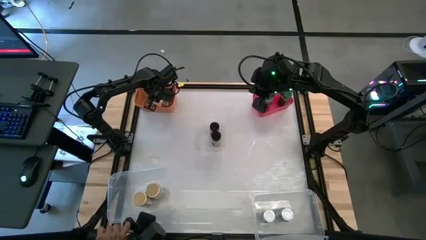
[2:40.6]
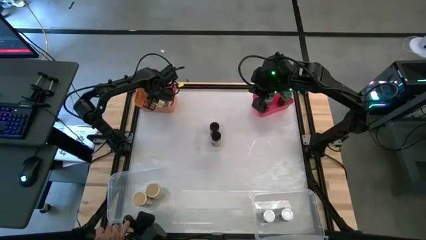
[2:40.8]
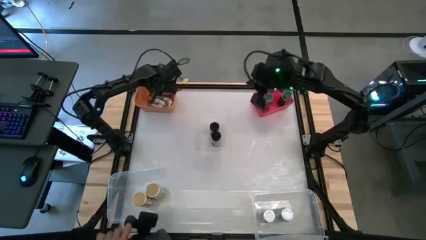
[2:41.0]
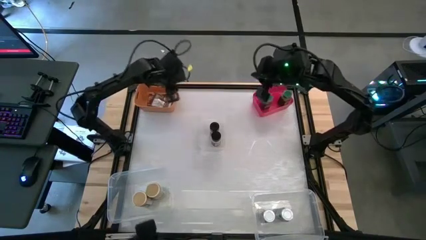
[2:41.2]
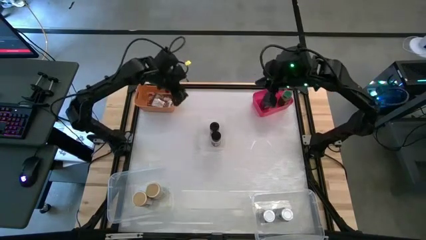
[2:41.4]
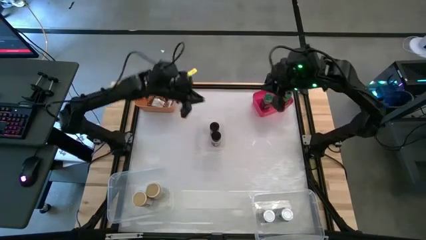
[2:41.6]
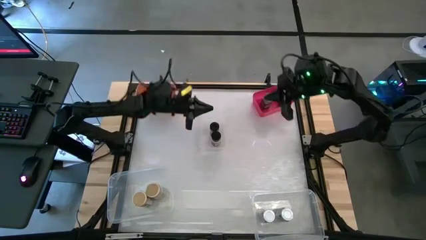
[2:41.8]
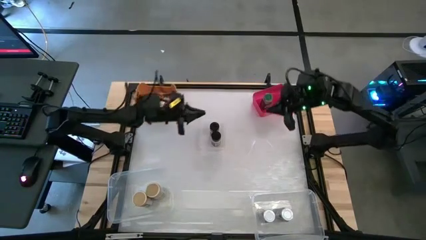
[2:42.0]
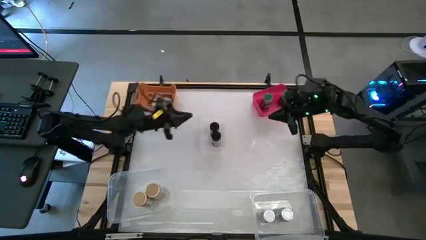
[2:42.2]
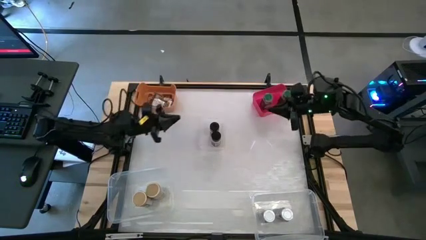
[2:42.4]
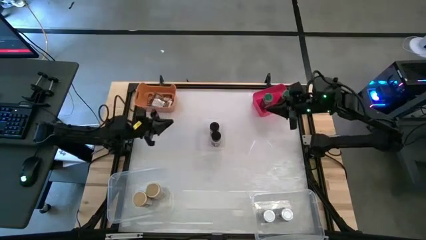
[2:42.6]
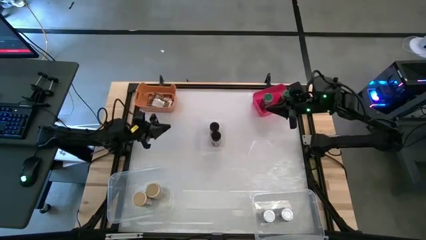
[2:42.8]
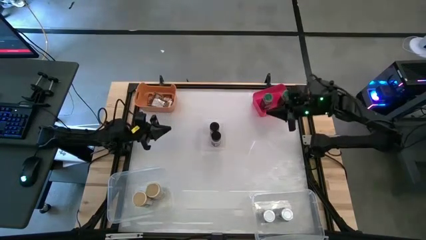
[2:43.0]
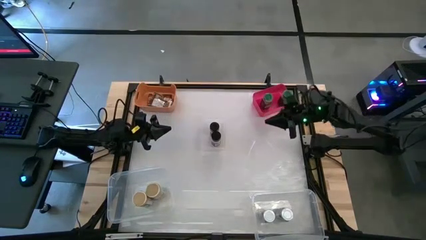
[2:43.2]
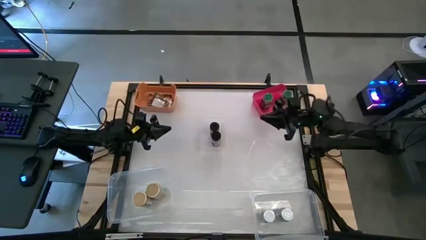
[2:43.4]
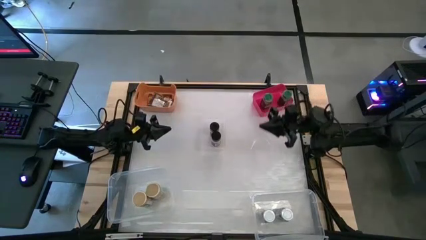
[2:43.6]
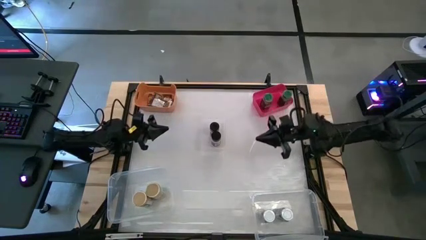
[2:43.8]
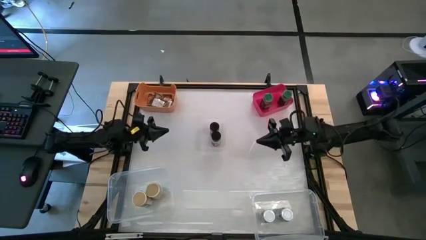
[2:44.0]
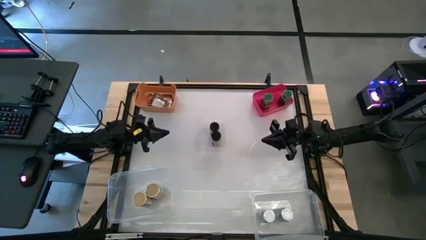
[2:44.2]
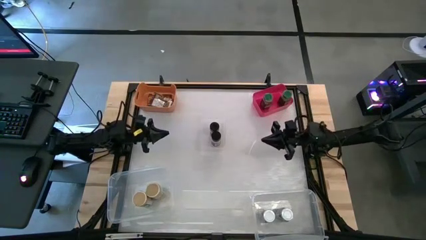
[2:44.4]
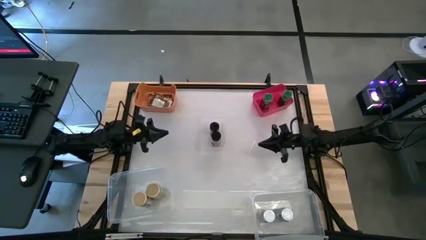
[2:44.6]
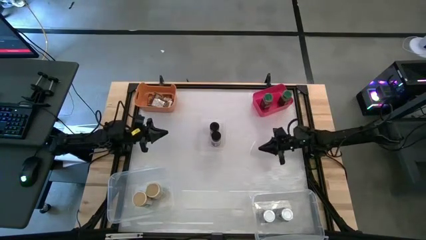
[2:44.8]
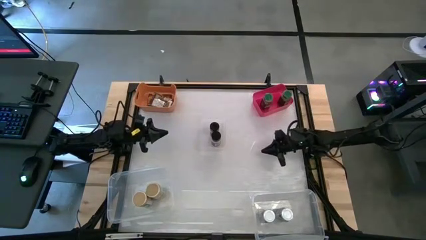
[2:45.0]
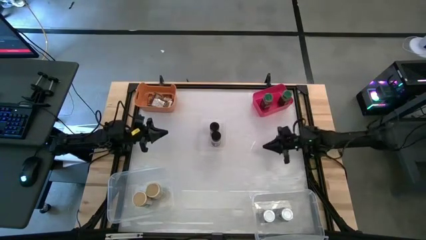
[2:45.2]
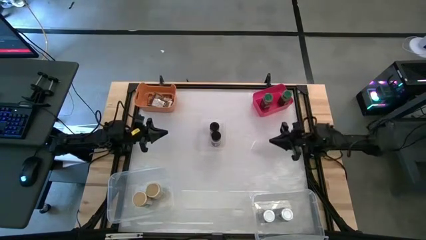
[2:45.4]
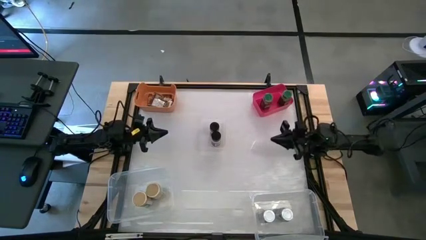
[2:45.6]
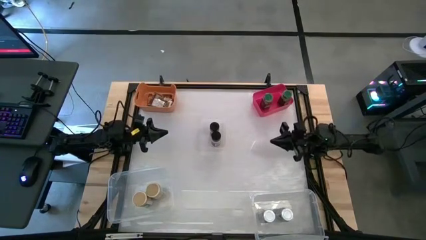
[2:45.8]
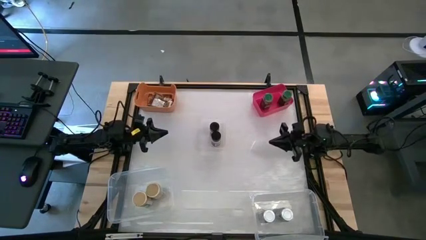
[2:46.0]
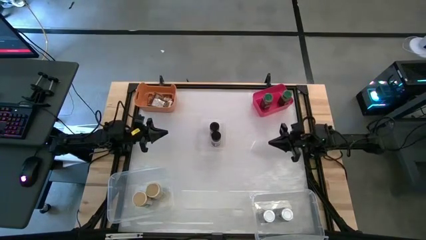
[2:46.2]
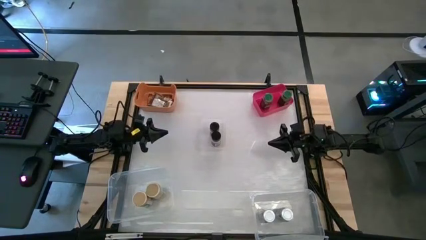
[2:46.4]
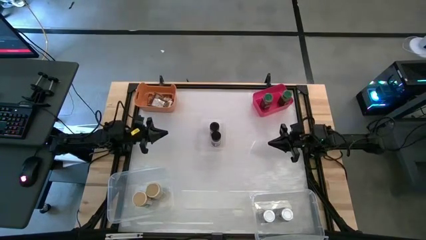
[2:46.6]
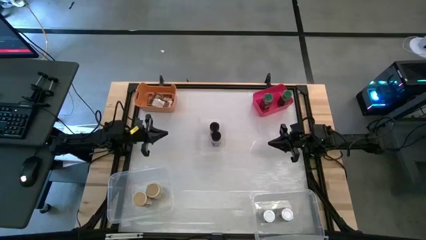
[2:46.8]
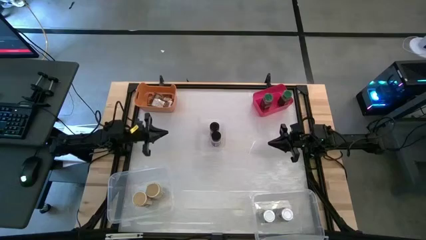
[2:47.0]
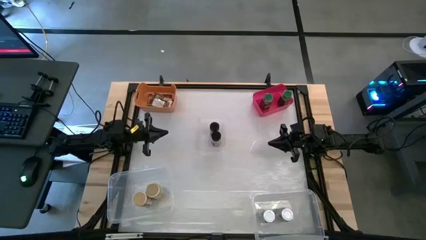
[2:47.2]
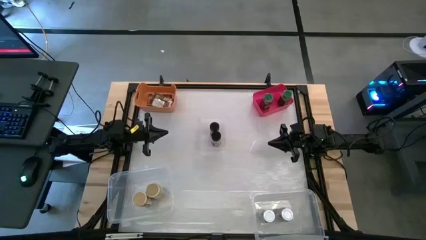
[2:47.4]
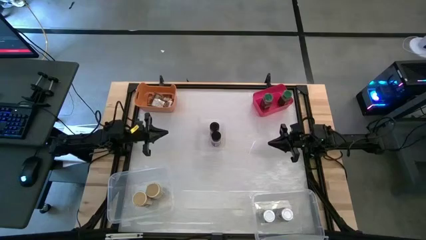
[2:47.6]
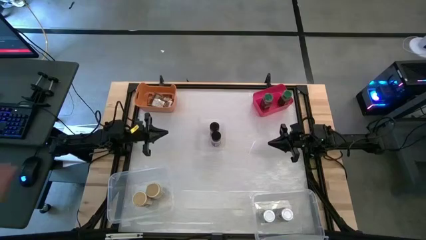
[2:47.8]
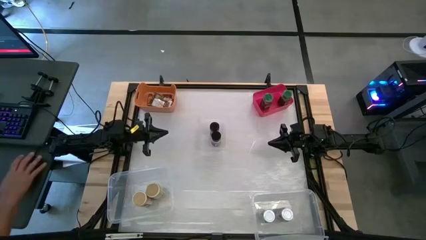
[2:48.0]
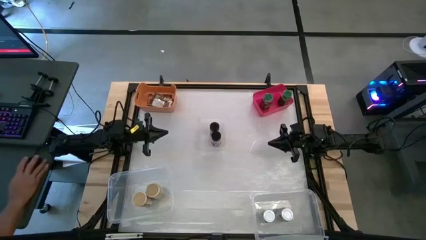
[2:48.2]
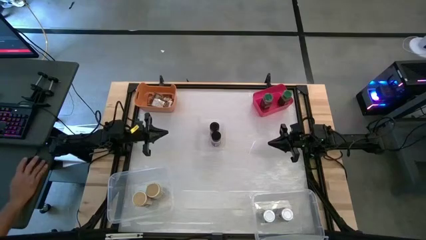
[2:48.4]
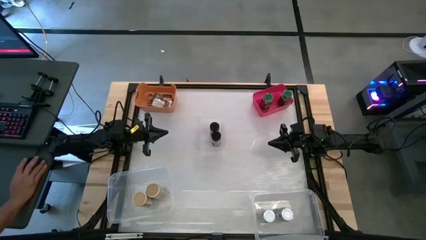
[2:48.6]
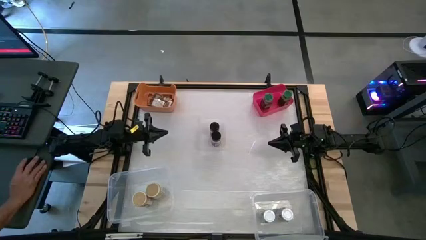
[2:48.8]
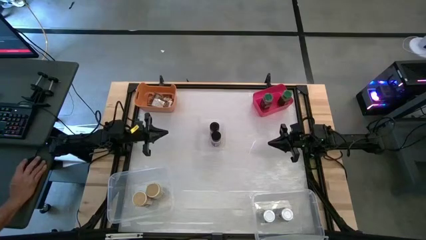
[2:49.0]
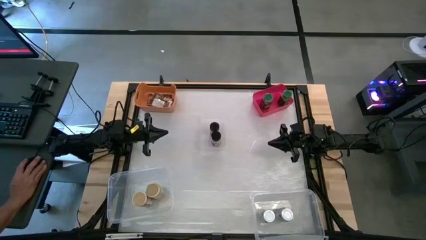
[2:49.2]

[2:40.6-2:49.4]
Task: Sort spices by type
Return to Home Position

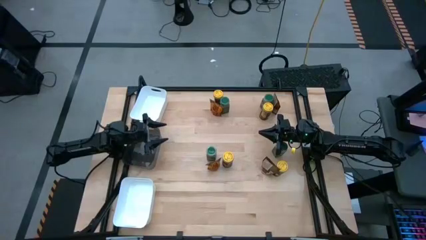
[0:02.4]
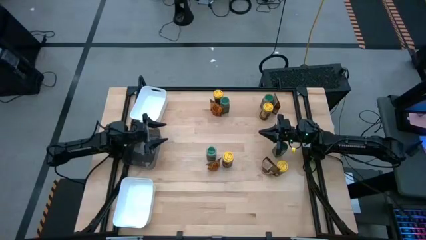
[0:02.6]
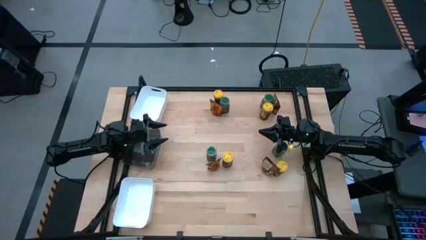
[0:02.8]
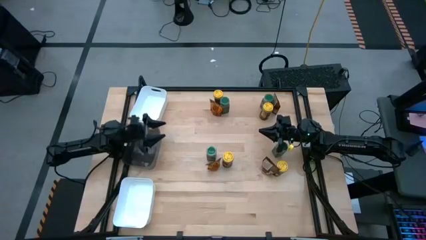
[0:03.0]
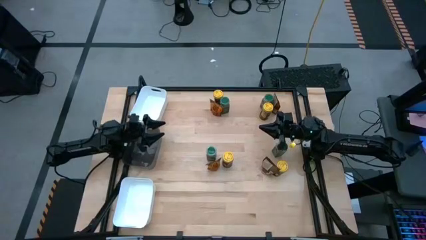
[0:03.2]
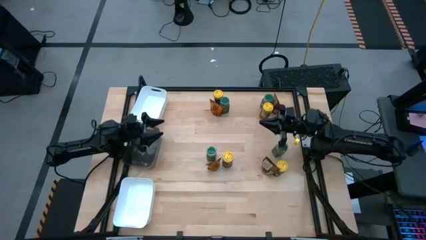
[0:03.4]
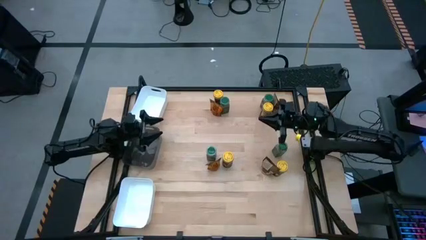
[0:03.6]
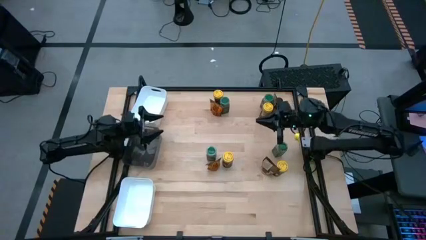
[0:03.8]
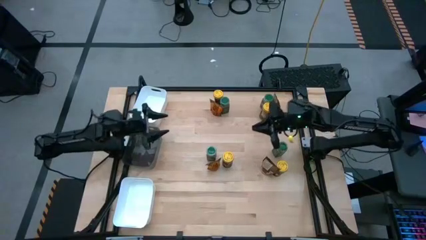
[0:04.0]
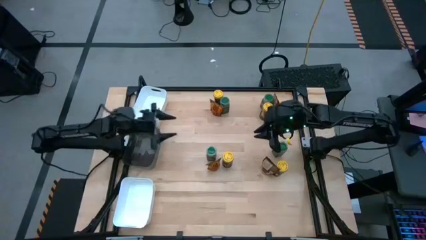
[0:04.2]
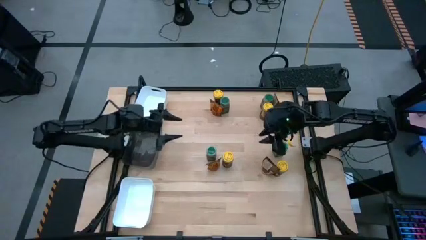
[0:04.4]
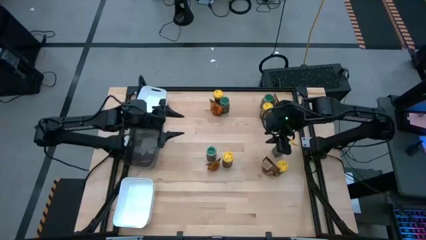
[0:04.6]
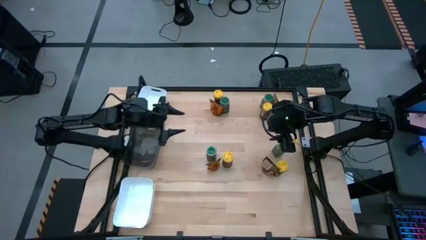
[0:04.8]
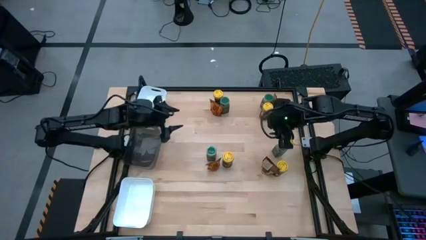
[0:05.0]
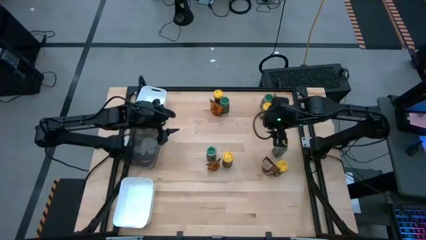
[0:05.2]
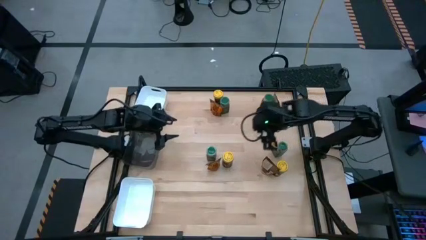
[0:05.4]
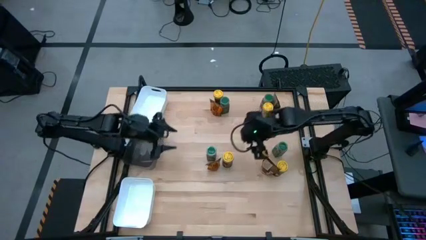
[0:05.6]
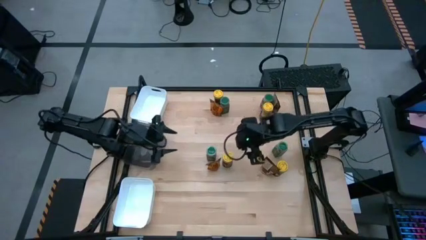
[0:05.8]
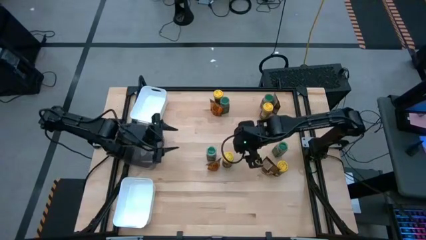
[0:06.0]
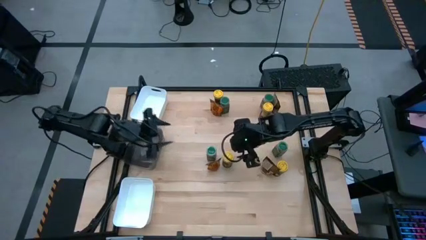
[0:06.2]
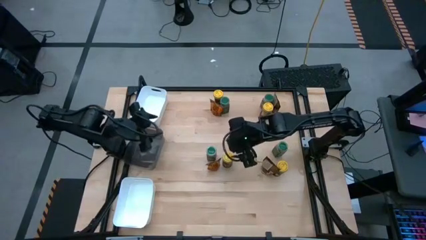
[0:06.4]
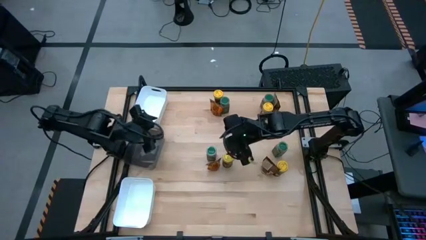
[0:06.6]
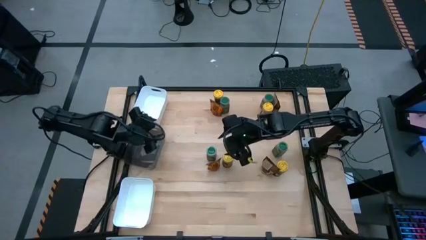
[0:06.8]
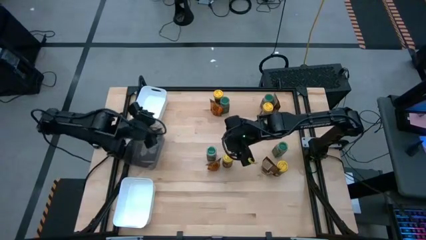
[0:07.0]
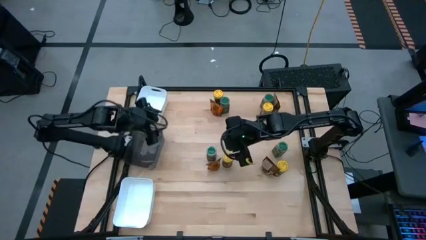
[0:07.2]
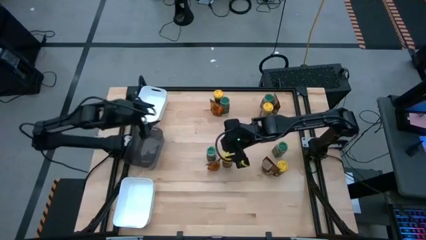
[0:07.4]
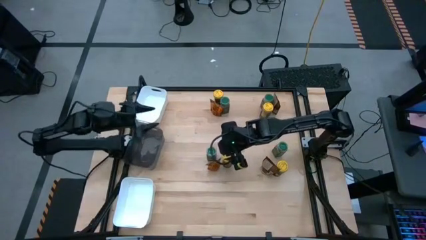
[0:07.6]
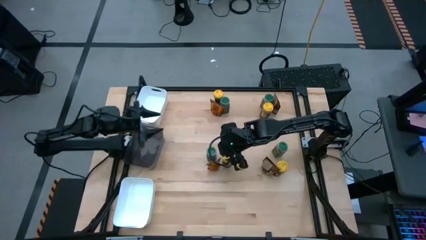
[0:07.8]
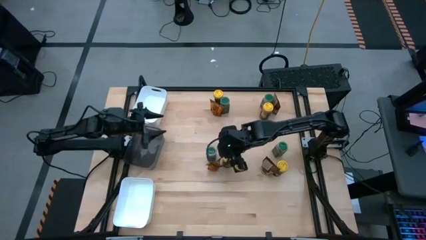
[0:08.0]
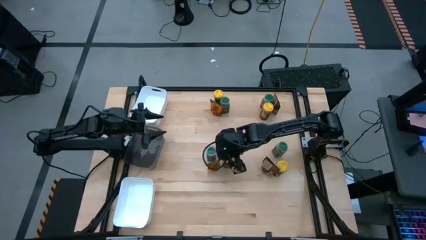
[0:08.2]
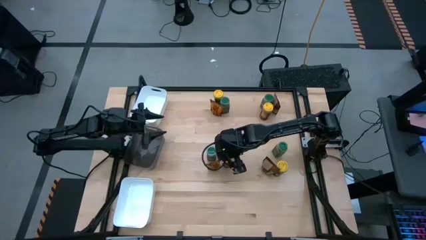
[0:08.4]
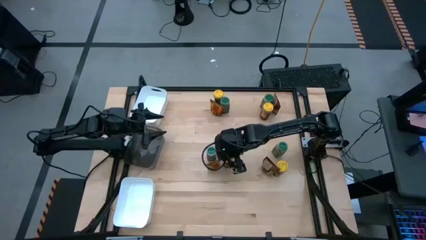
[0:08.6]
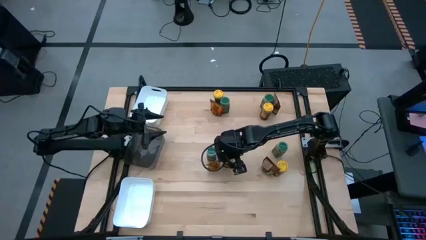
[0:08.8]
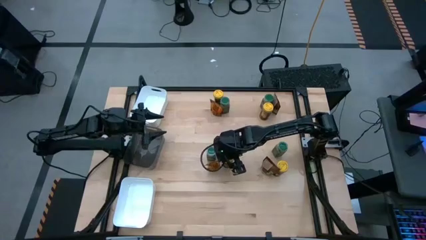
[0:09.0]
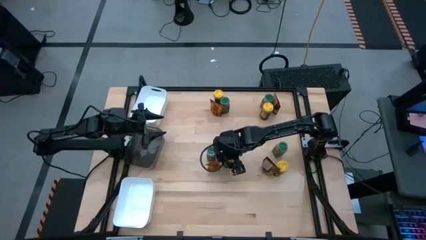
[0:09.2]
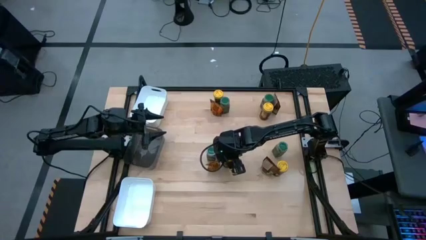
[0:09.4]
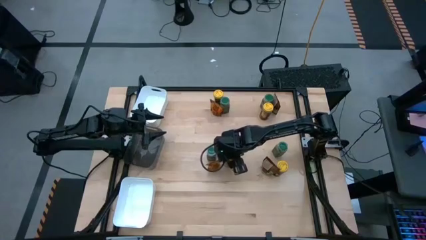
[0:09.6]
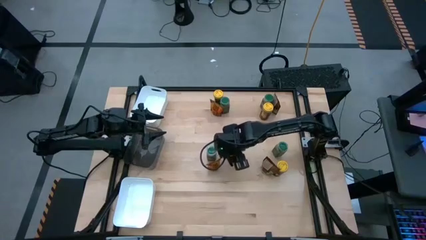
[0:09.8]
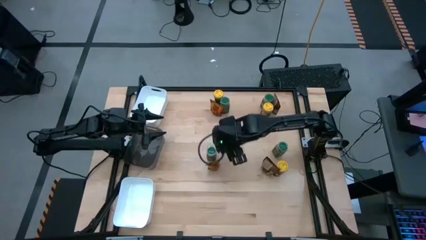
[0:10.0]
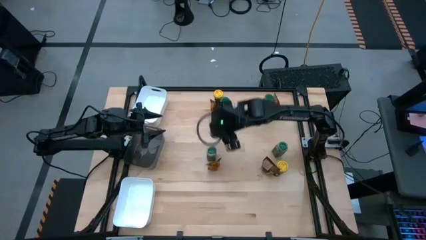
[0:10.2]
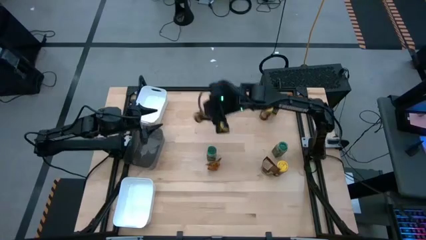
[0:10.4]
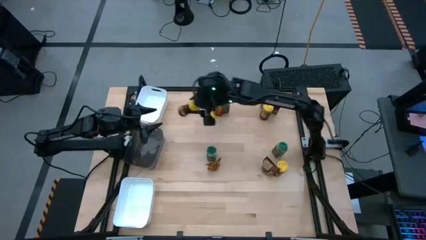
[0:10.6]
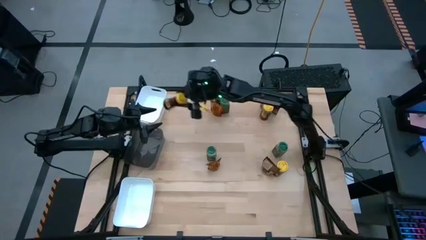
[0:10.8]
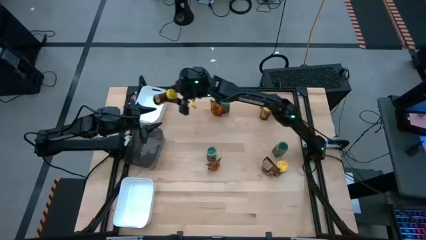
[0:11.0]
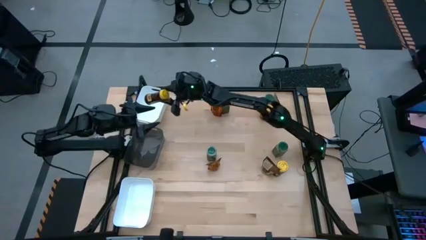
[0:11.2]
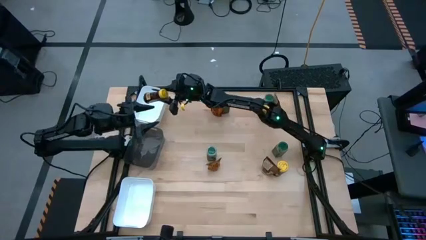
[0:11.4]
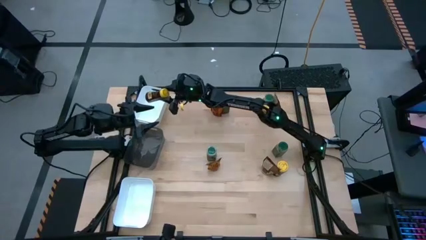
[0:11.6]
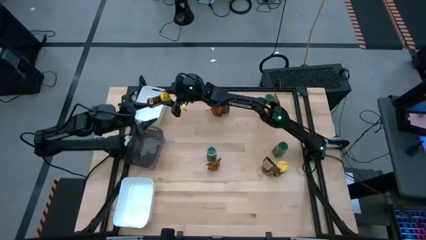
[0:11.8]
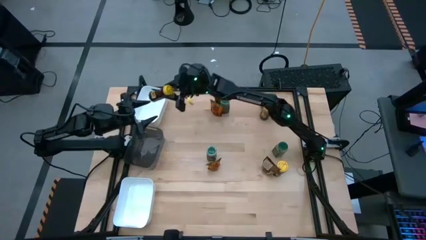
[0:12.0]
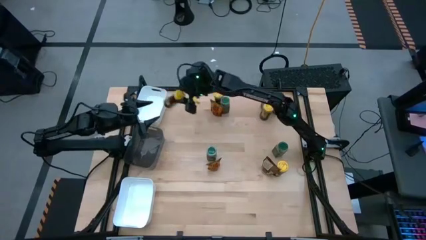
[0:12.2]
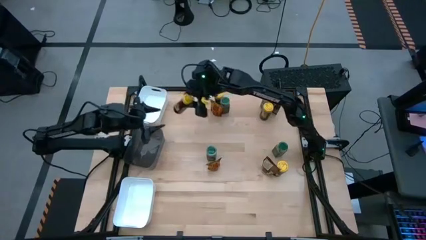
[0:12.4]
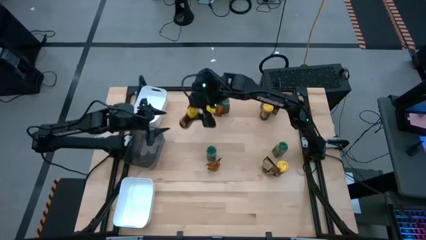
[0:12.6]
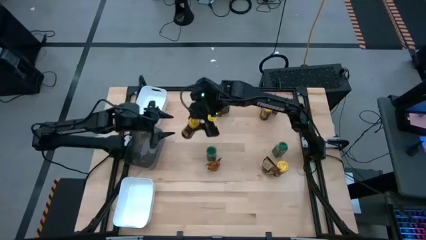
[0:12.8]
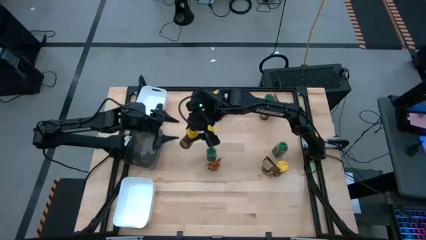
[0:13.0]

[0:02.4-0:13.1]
Task: Sort spices by type
Put the bottom left yellow seasoning bottle into the top white bin
